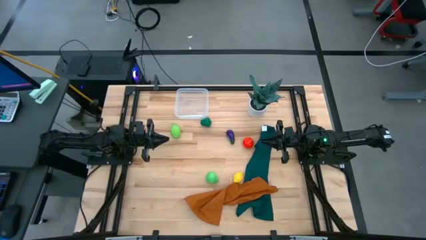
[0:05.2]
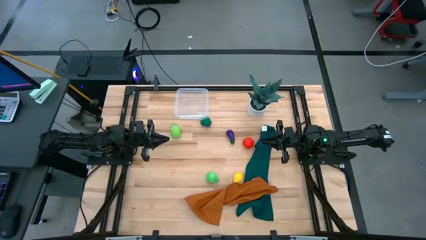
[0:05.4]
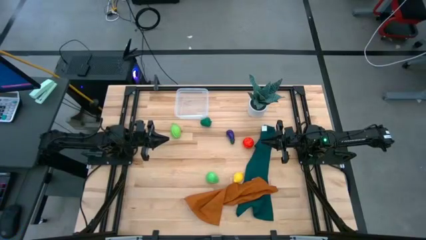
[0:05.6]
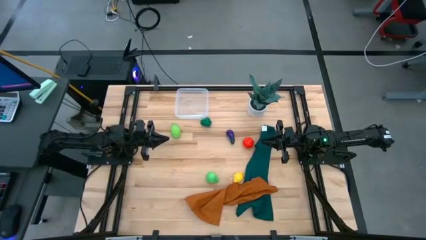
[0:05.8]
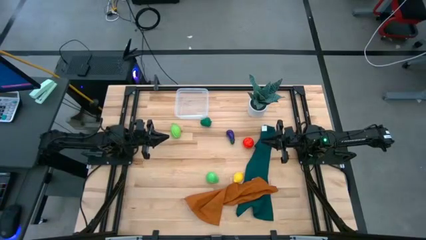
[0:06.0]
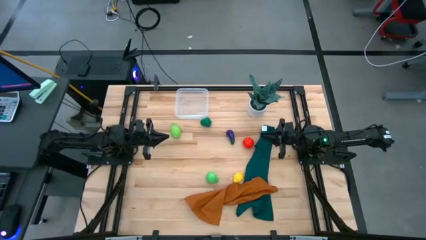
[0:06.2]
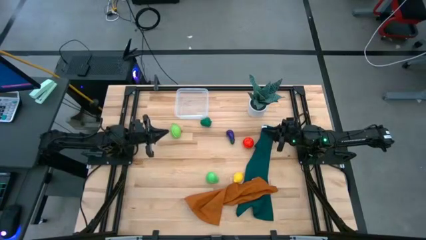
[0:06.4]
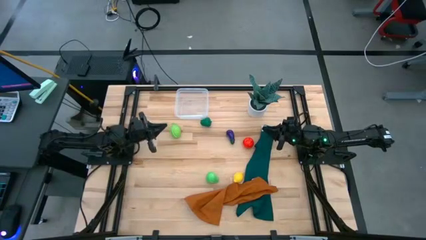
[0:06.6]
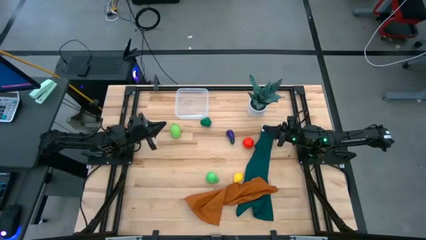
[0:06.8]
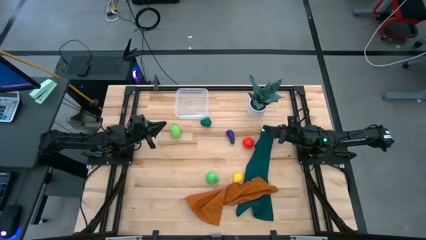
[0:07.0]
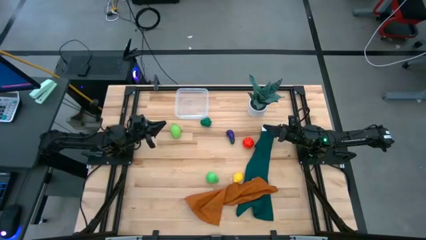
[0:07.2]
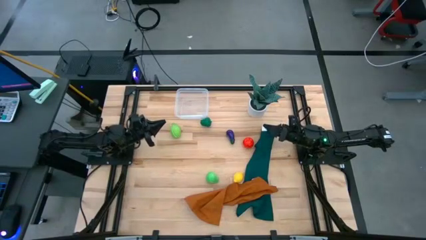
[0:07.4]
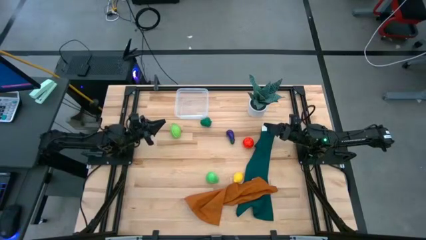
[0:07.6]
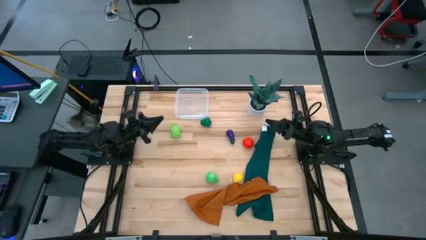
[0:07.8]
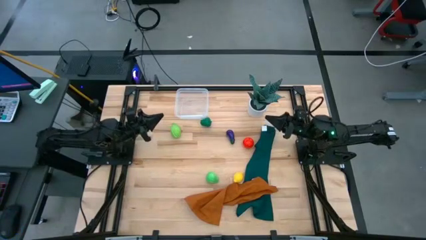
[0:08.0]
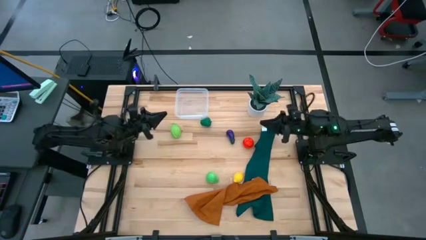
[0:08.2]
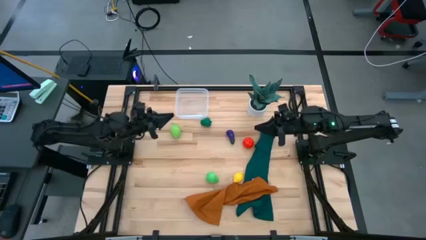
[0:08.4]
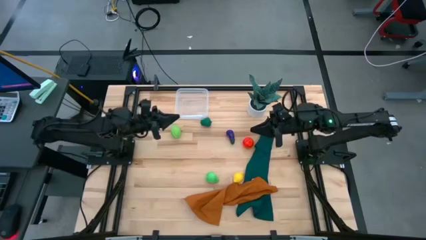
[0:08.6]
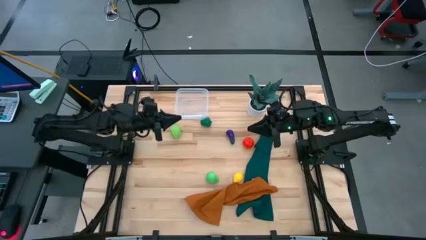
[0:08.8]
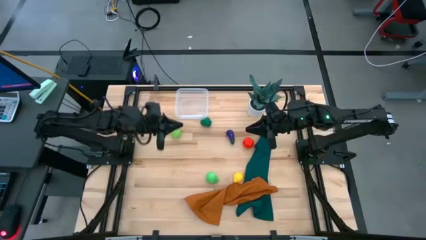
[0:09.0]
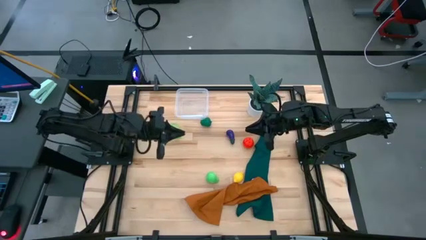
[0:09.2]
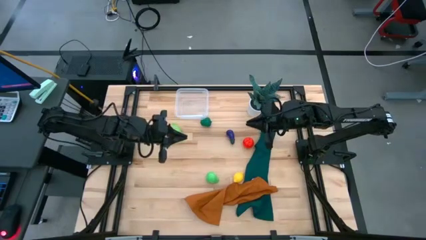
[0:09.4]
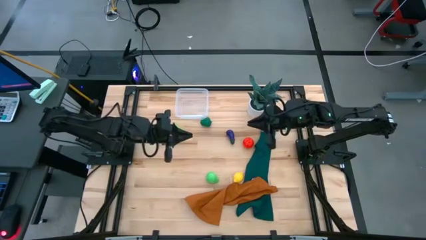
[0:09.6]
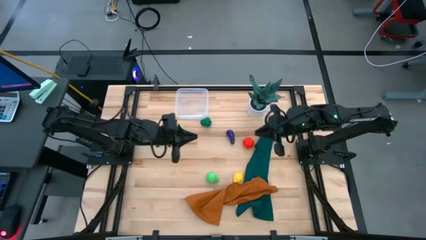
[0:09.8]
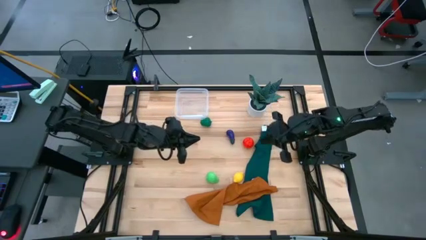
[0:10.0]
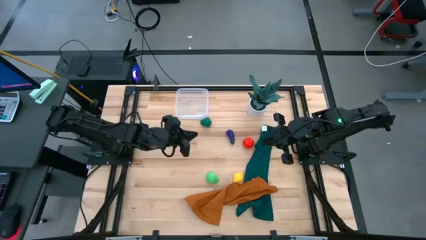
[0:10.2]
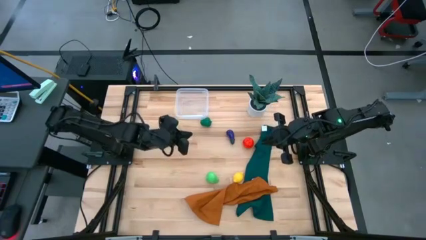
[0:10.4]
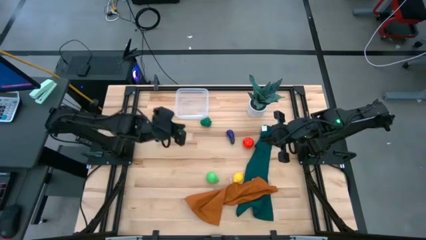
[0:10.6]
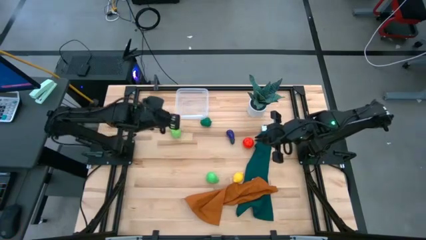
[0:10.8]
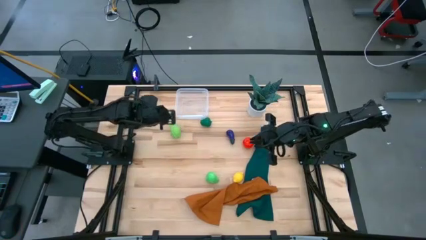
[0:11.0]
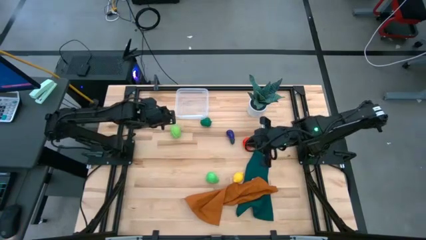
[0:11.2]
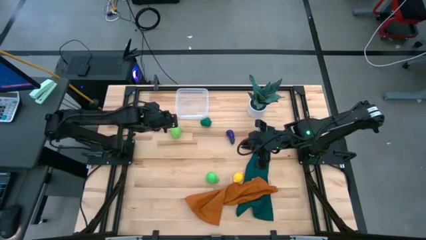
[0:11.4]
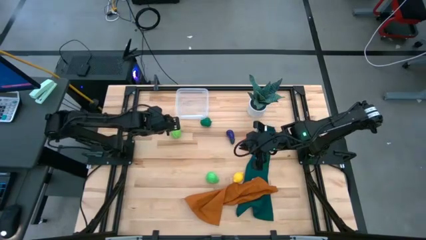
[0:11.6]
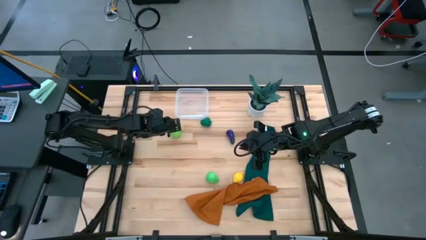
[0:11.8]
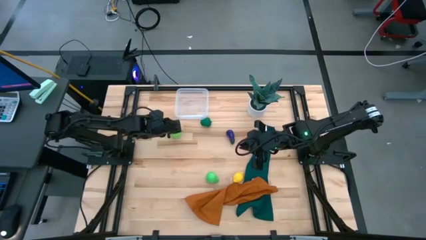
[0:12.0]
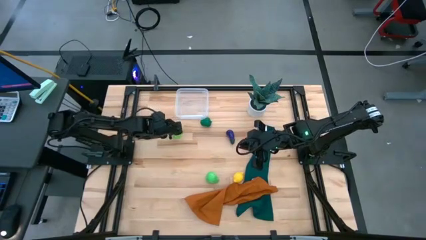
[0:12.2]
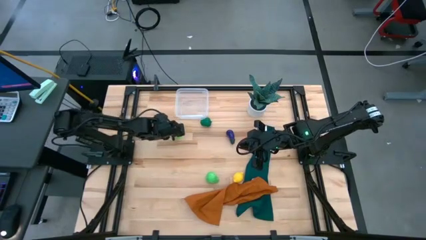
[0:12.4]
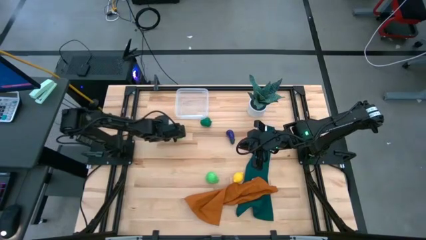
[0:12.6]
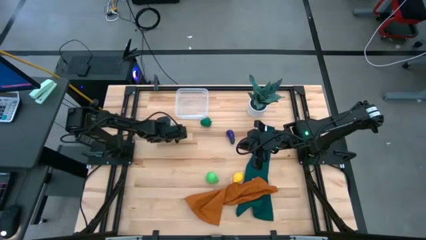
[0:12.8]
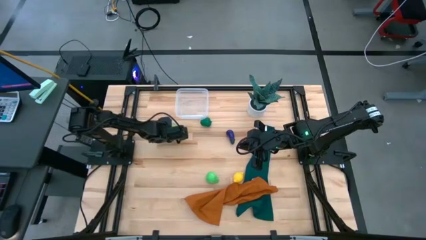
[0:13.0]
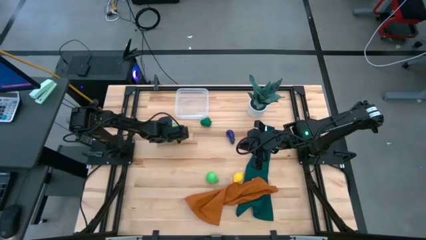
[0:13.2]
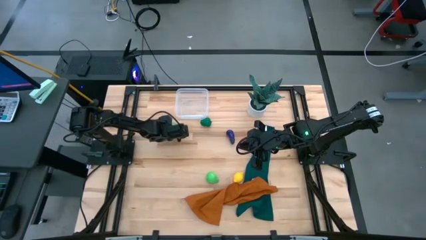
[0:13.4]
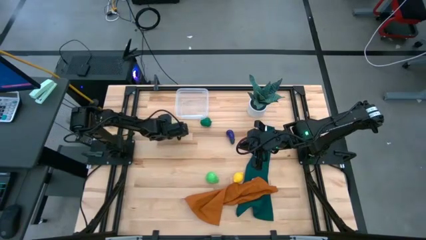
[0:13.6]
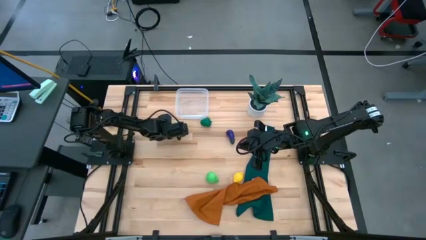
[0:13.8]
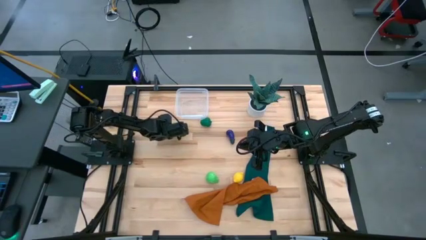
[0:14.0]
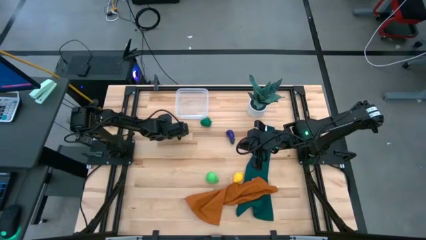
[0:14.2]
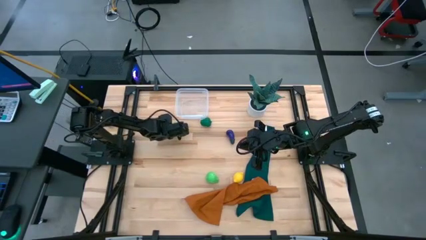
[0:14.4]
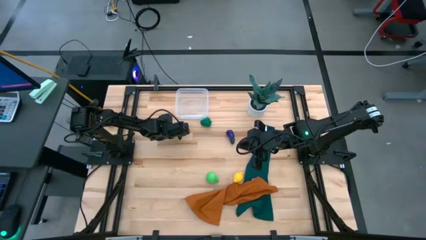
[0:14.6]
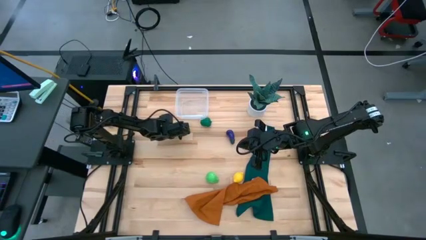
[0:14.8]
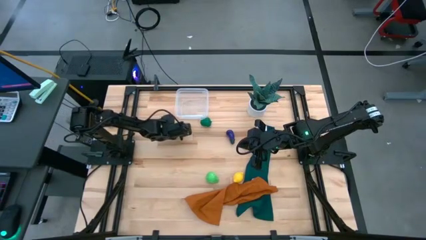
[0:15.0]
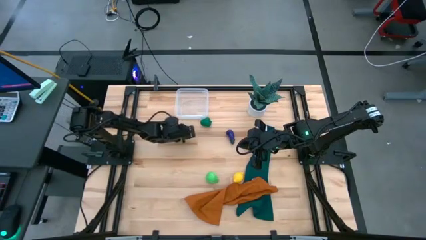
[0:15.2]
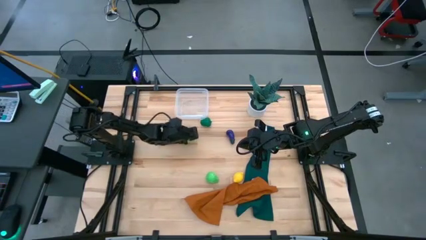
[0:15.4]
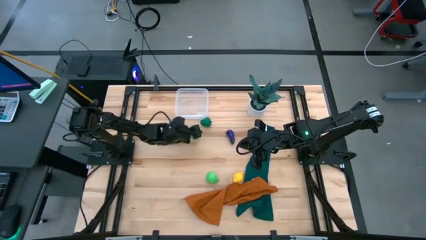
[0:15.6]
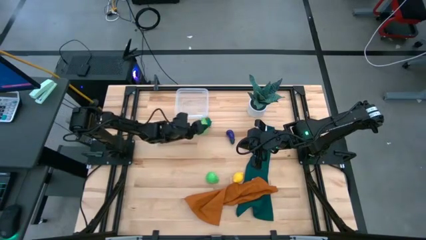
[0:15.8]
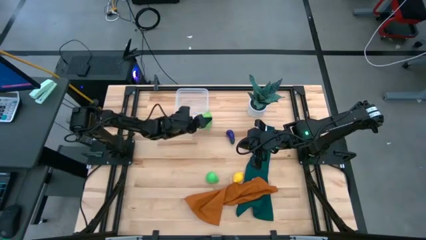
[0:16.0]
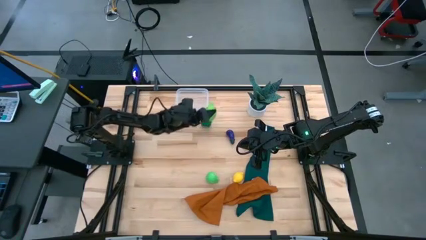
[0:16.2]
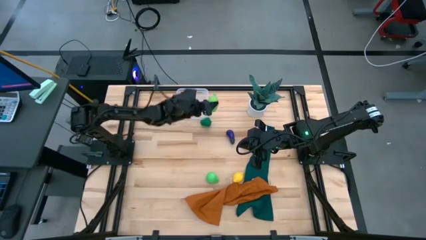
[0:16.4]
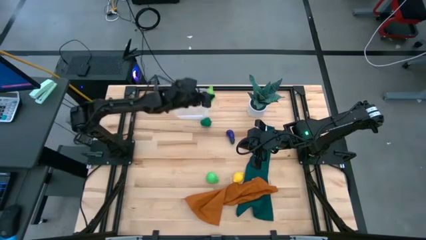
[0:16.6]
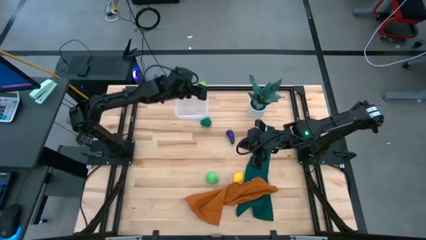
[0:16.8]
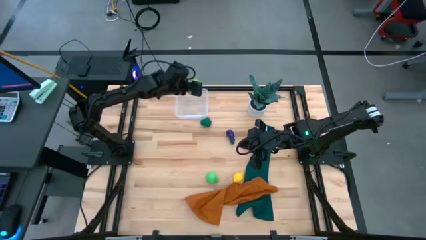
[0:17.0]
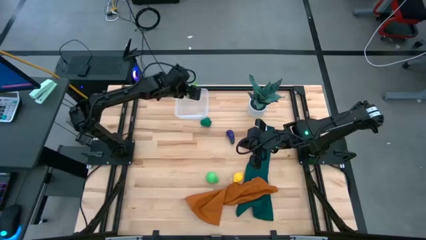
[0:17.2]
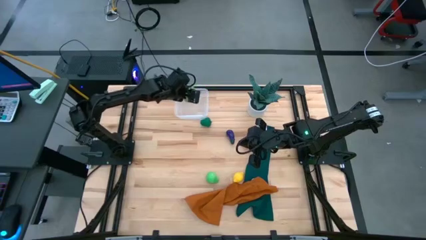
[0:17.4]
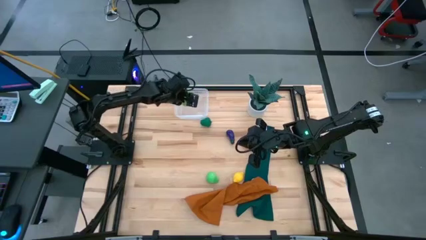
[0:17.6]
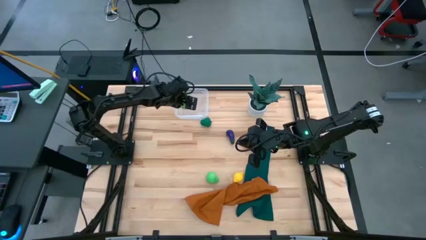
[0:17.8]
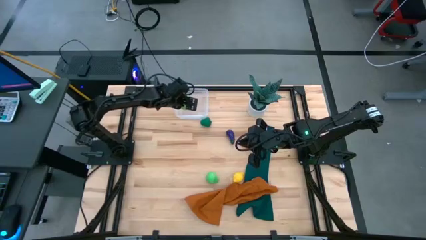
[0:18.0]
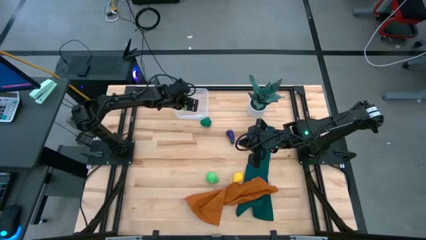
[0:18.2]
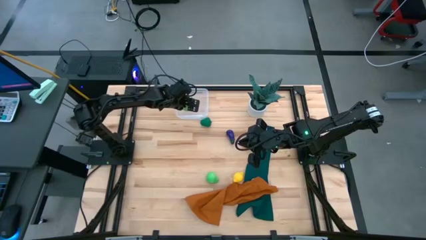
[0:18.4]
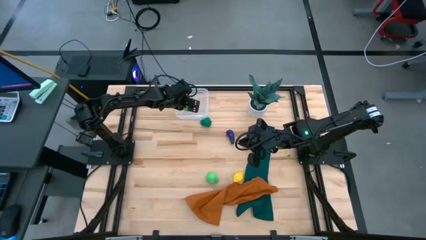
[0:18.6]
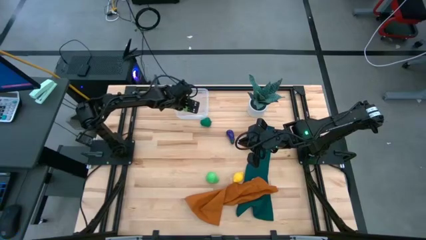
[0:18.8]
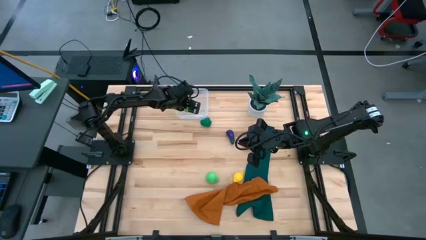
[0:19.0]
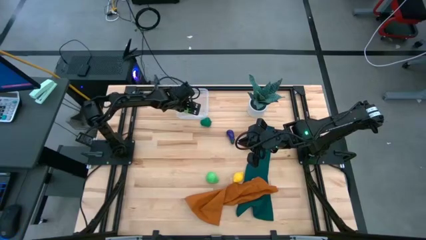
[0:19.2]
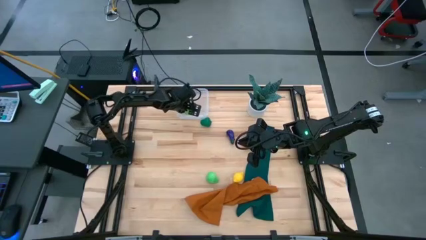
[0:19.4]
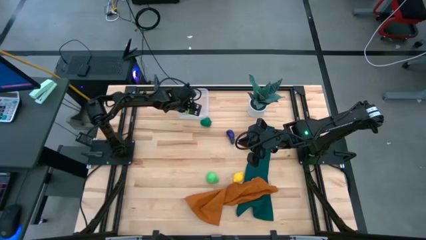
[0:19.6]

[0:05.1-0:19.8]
Task: Pick and placing Produce into tupperware
Put the green melon into the transparent bin
